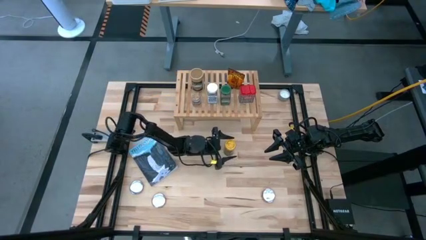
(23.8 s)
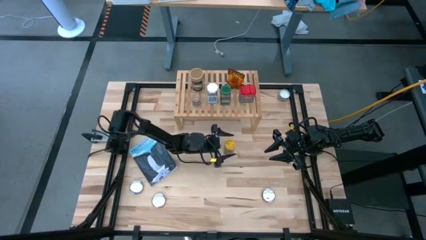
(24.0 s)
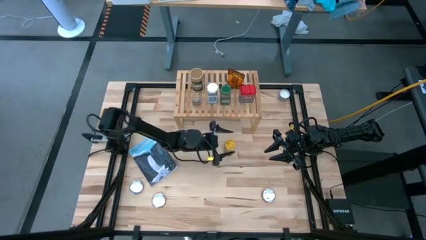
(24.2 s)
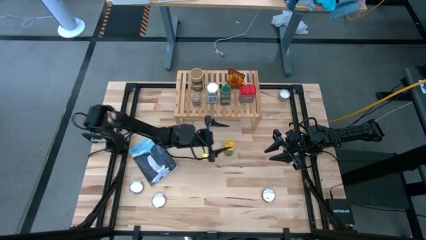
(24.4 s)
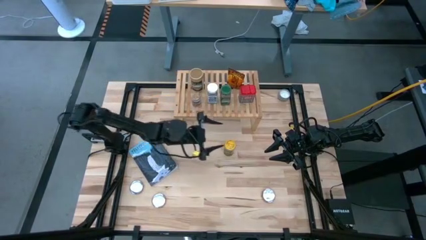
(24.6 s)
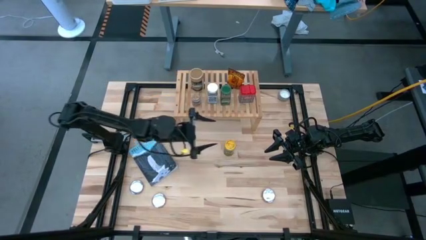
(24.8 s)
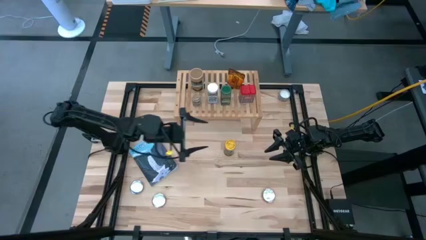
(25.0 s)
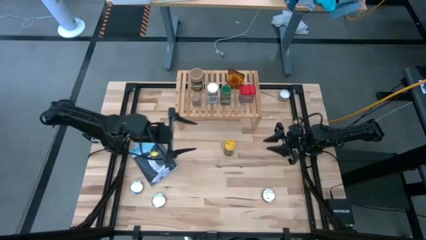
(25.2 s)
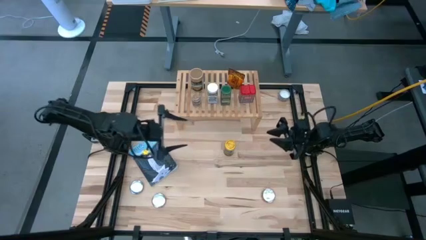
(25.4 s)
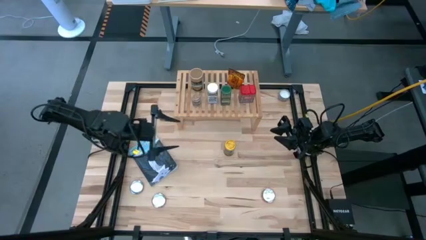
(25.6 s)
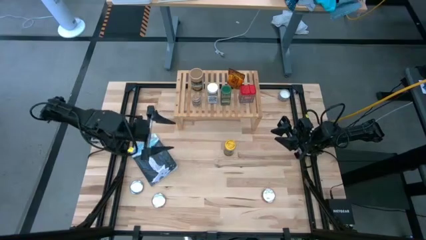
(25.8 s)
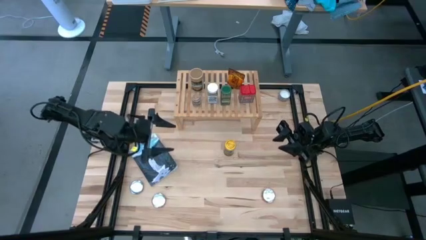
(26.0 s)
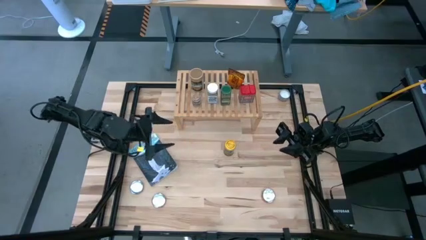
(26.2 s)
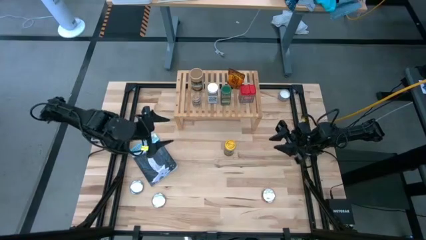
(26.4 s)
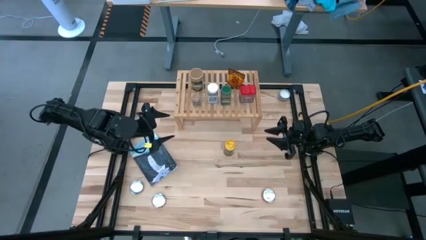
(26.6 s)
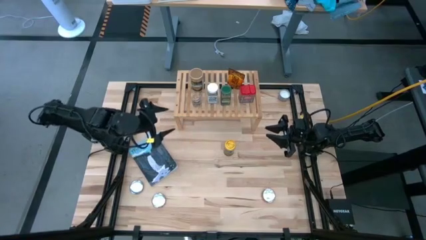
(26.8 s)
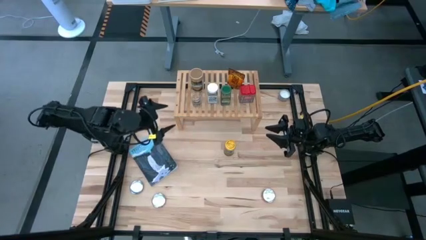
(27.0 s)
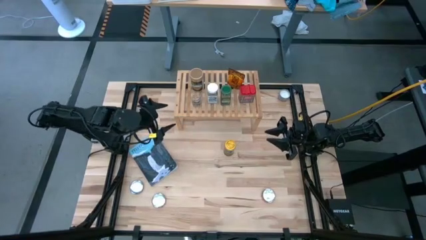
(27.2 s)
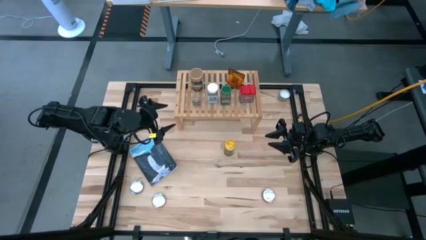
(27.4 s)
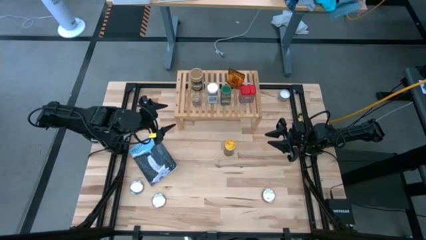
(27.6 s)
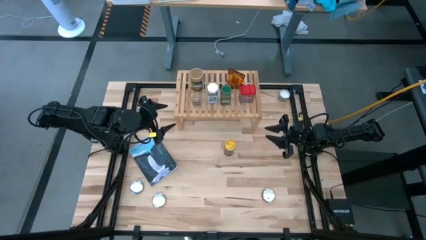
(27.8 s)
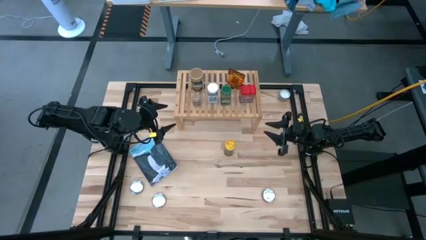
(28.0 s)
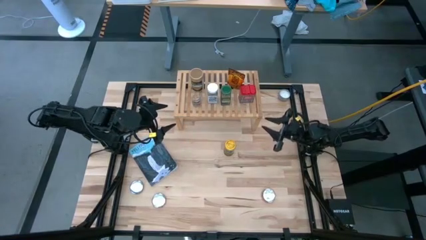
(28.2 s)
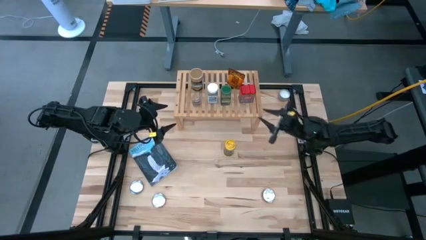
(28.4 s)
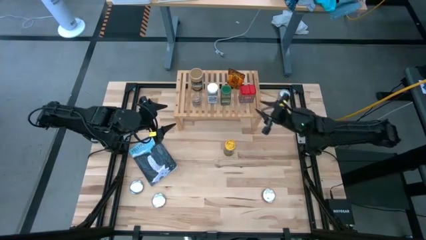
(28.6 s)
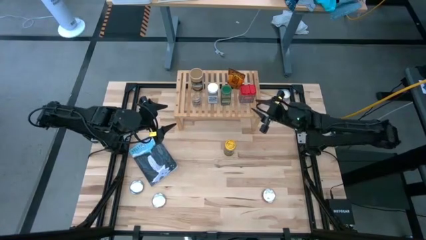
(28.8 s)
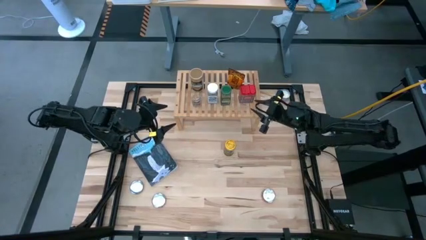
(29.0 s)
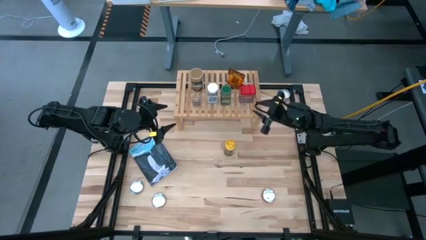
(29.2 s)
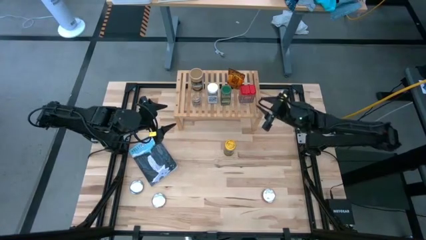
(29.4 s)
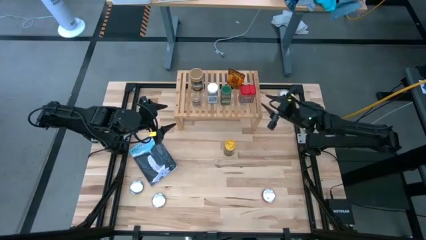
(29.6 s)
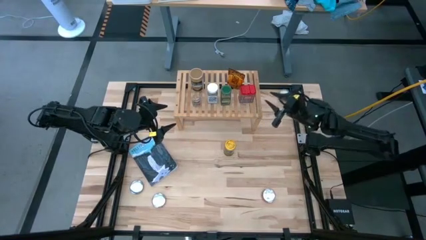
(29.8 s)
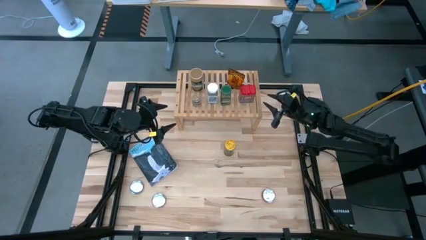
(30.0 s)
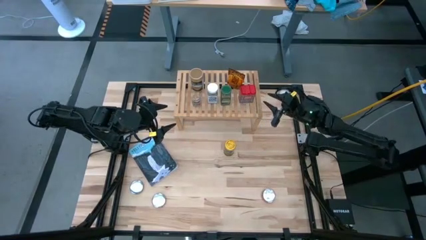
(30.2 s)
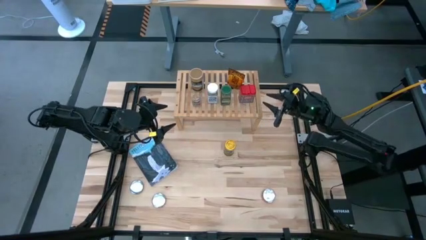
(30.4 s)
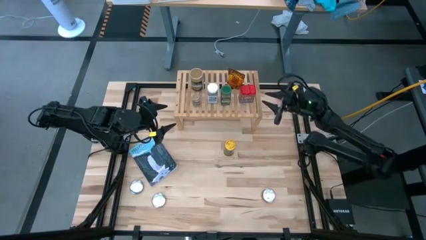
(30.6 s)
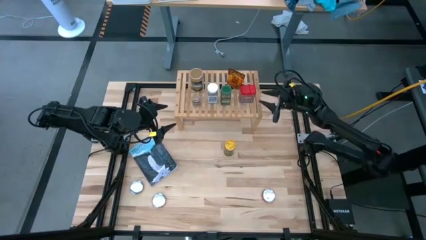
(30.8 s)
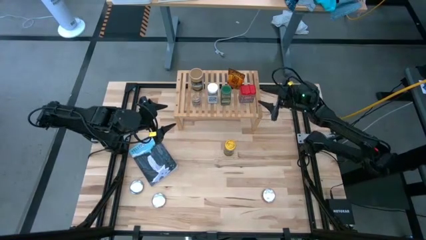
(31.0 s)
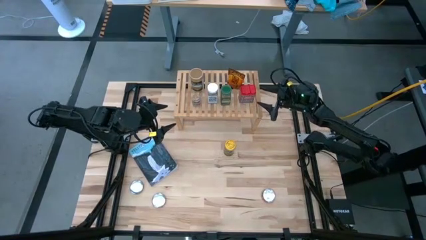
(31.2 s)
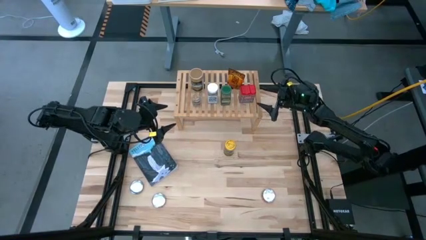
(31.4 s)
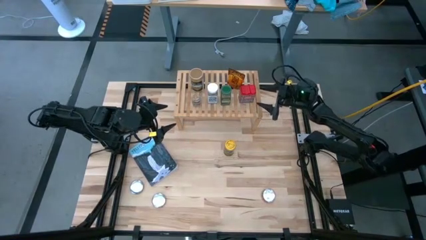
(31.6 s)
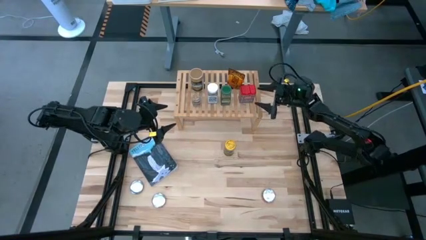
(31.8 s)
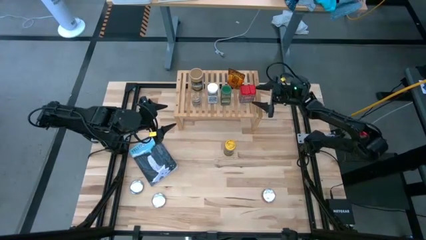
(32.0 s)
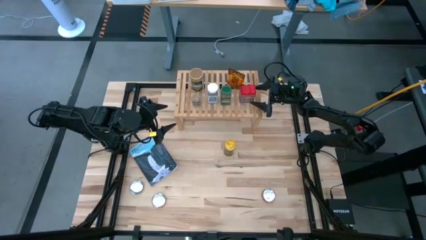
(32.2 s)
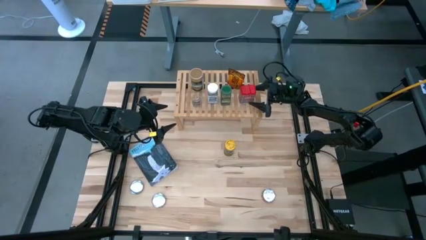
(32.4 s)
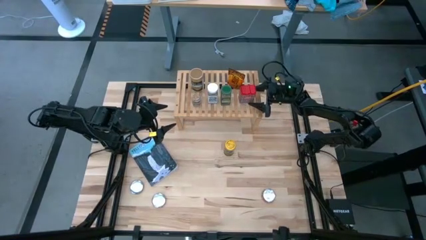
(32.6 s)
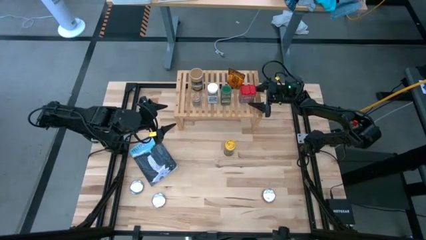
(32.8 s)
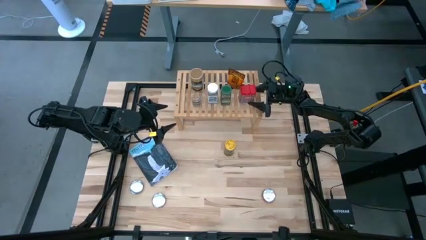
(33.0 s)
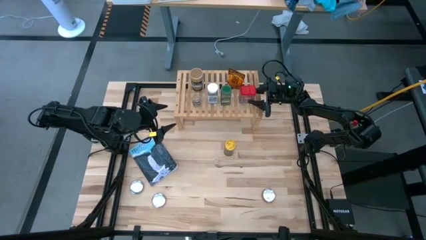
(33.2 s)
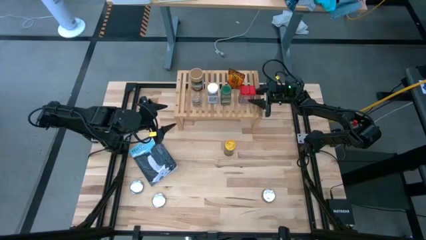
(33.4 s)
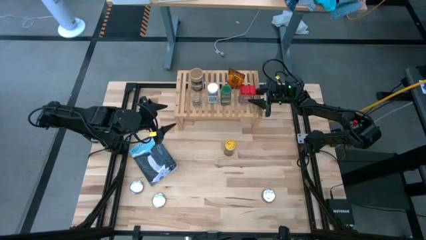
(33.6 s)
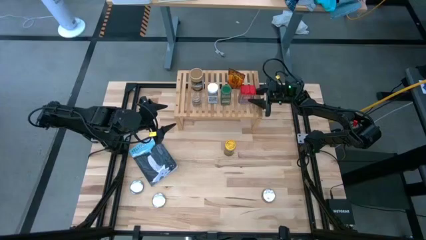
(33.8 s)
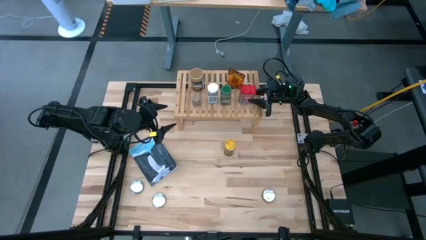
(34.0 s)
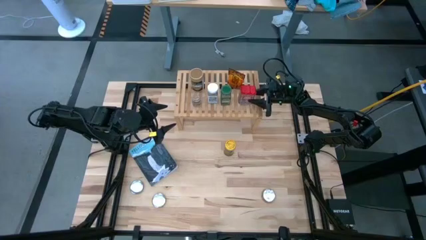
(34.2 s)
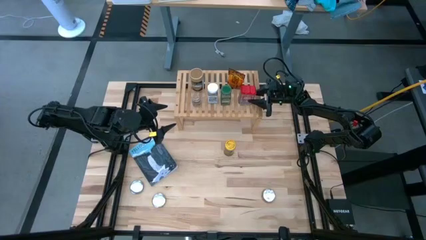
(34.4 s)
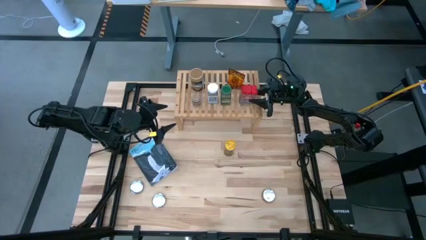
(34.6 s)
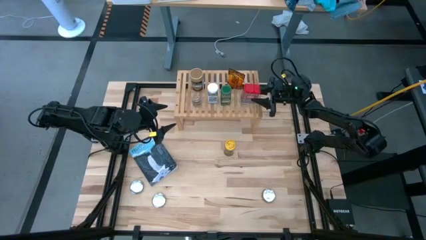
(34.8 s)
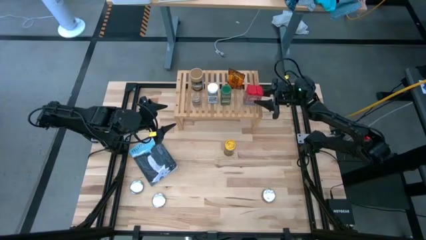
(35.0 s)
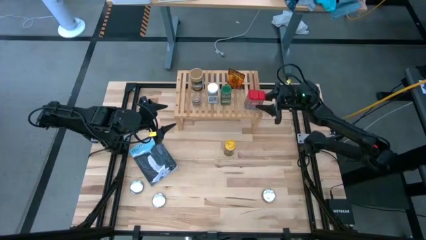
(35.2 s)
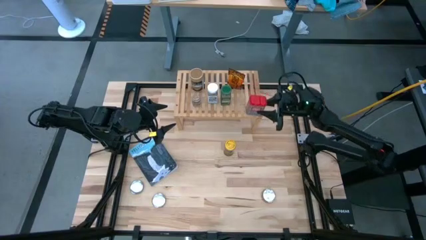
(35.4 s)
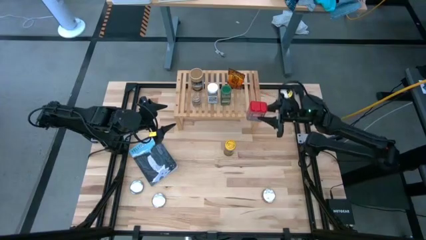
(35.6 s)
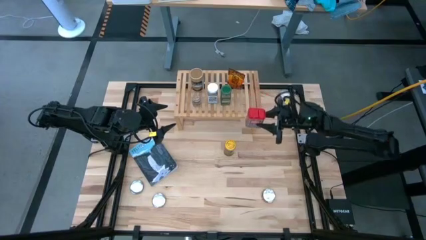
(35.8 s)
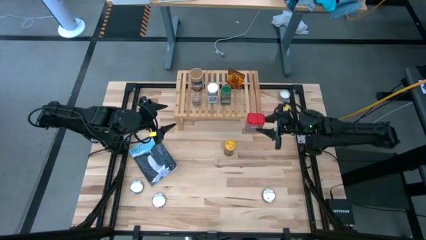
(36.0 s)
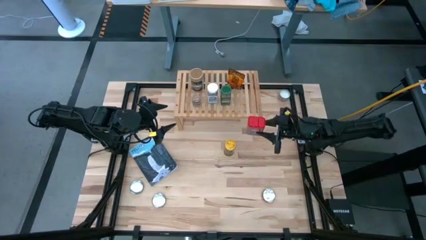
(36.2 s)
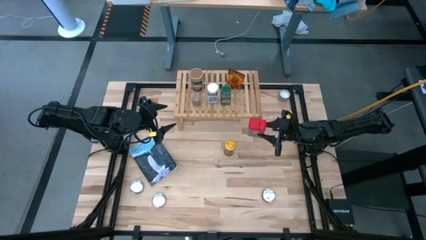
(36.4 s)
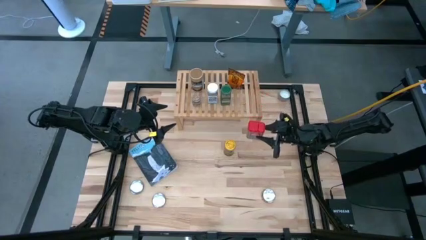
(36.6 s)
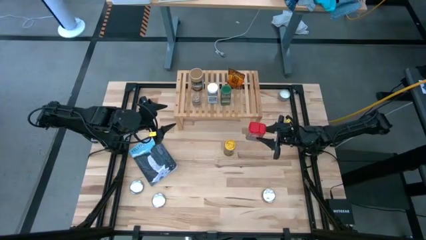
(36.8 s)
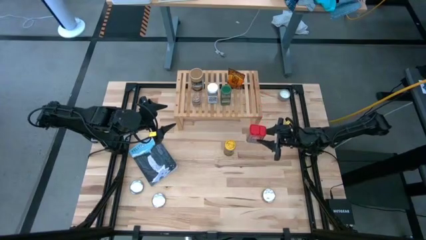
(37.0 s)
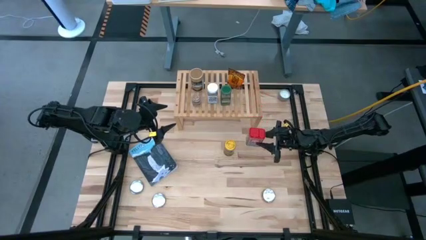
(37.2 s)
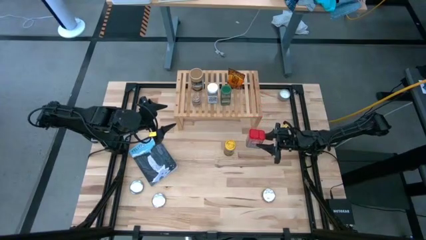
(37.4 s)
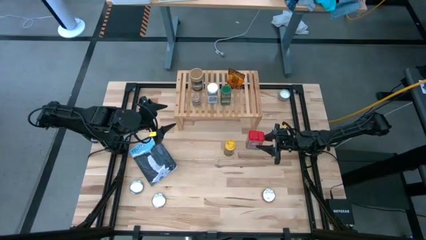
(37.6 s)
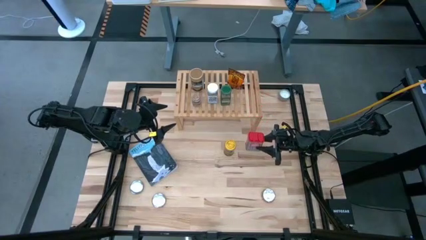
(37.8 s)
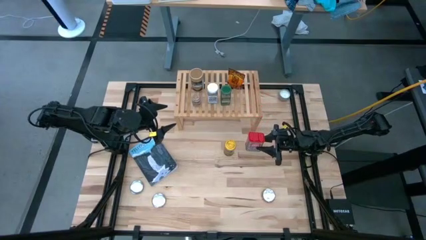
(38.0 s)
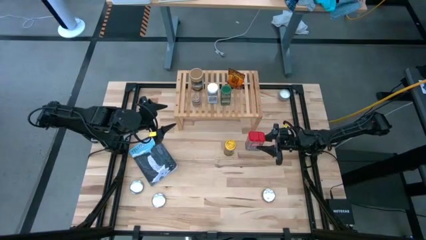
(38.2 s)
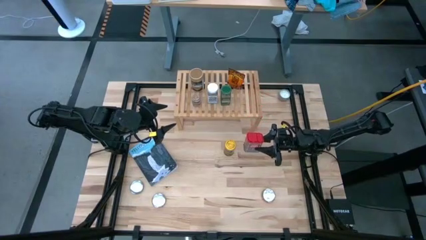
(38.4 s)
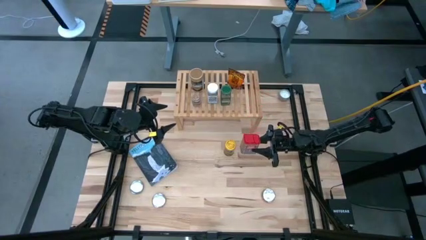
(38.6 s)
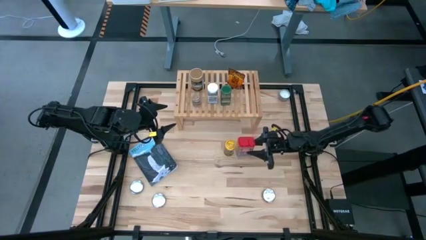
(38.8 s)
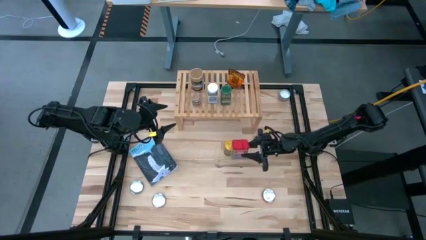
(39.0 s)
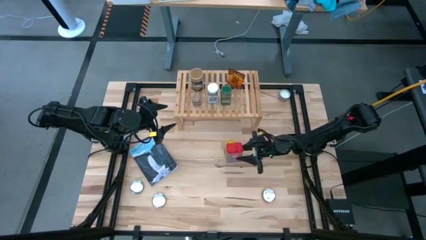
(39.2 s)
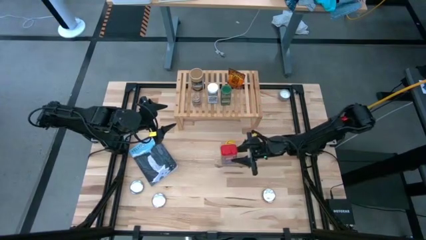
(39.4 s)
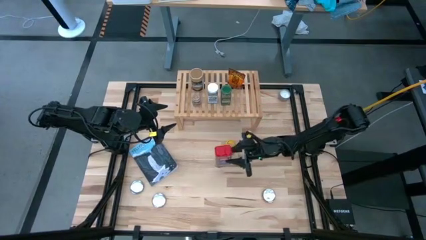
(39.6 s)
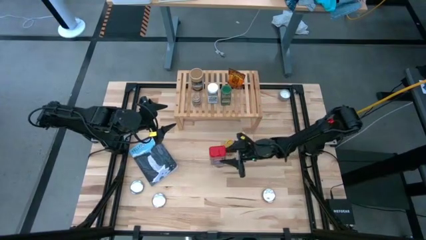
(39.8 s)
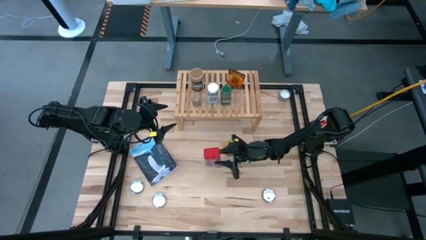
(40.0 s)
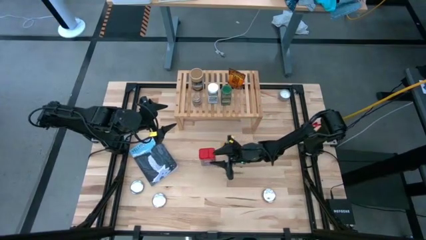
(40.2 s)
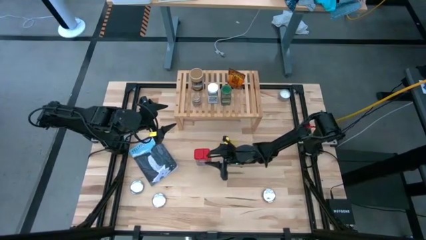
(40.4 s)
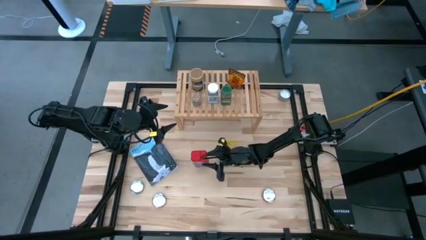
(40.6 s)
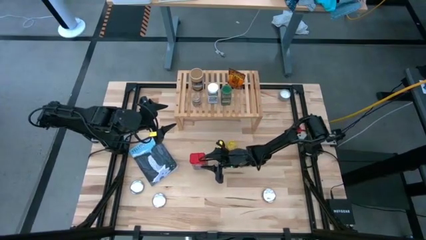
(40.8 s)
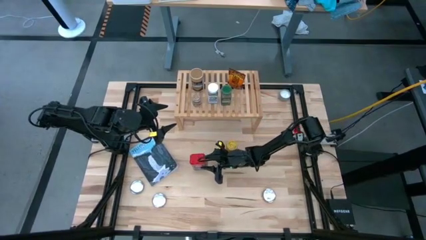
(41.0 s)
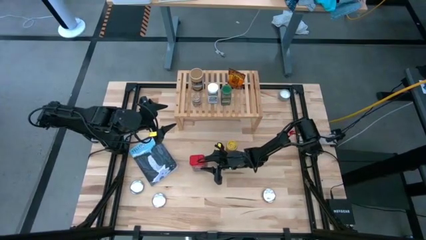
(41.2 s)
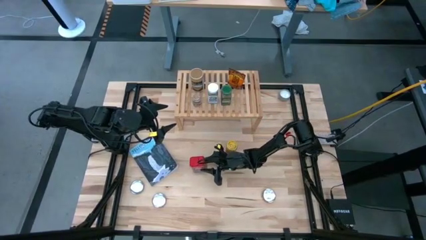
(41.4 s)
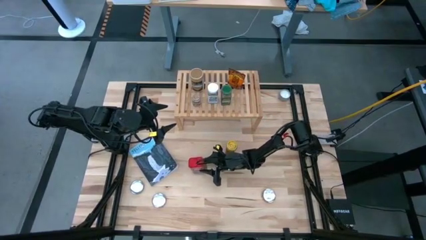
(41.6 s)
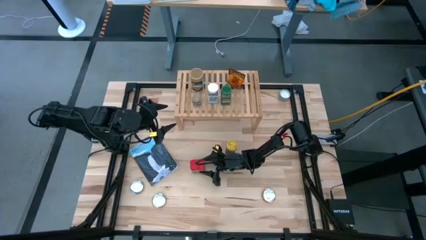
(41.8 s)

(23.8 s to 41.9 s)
Task: Shelf spices
Remove the red seasoning can from the shelf
